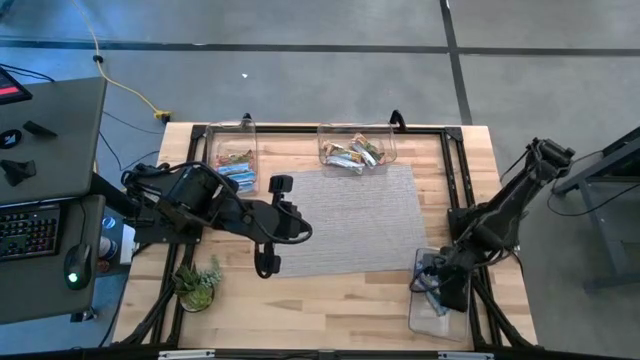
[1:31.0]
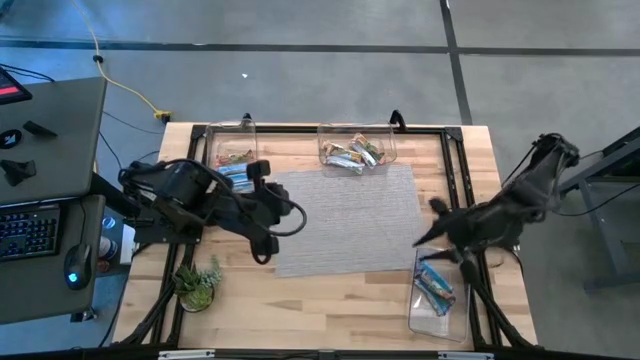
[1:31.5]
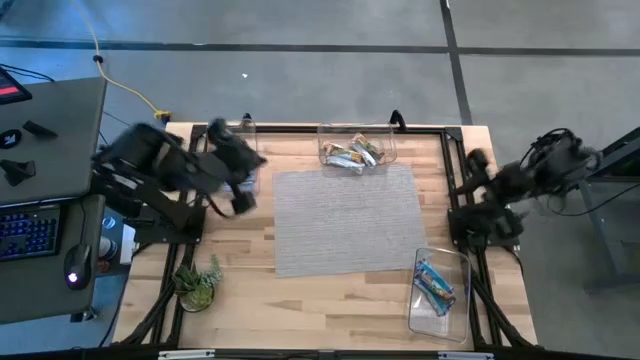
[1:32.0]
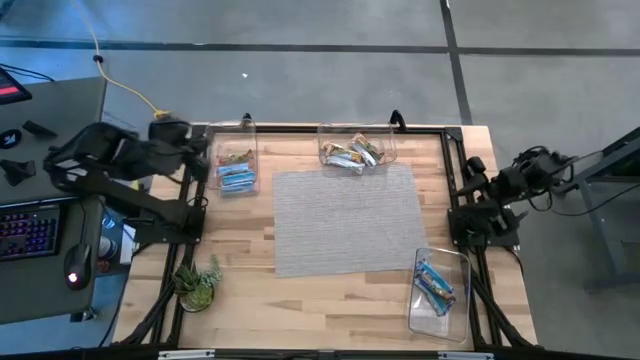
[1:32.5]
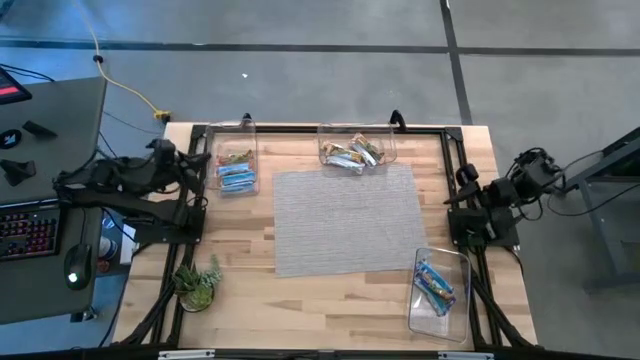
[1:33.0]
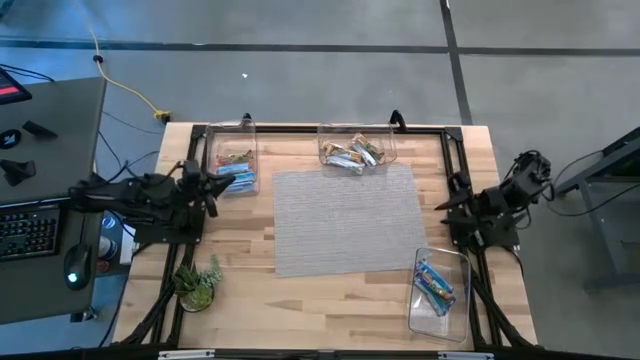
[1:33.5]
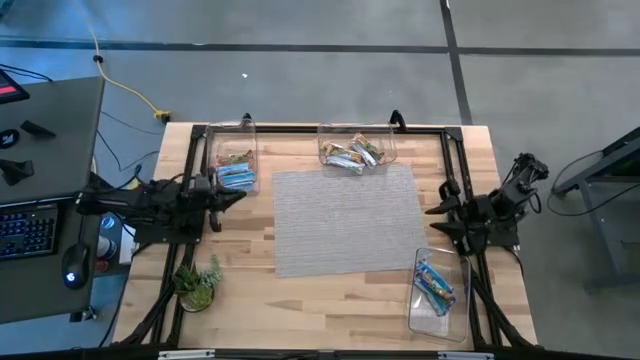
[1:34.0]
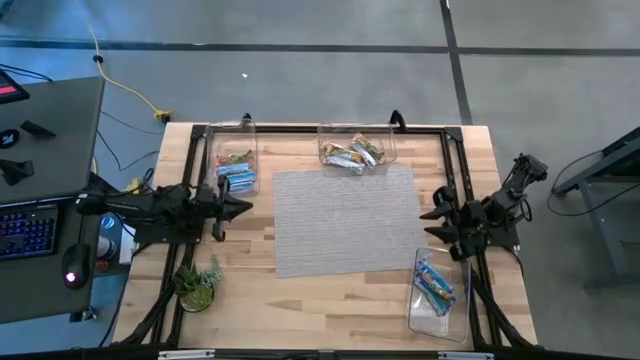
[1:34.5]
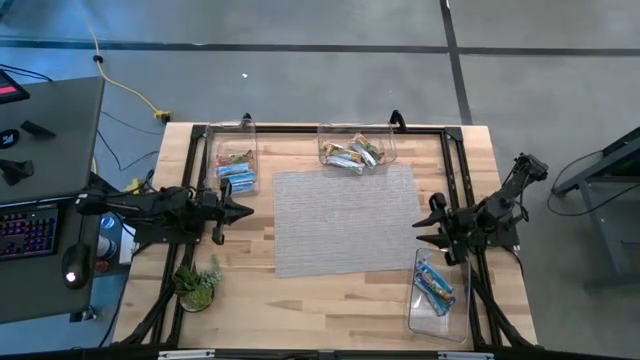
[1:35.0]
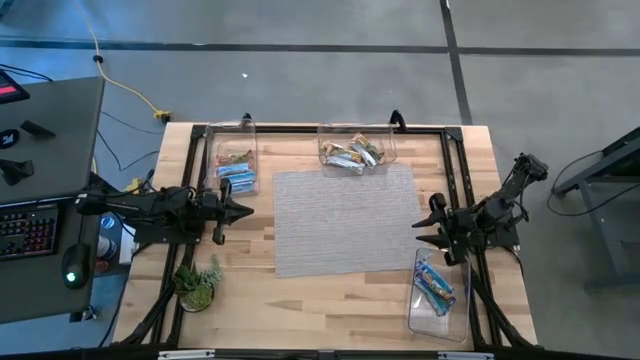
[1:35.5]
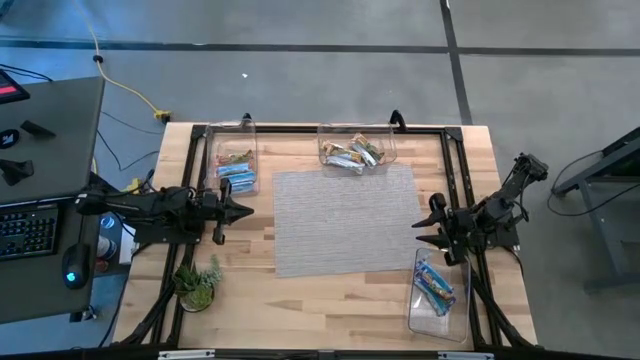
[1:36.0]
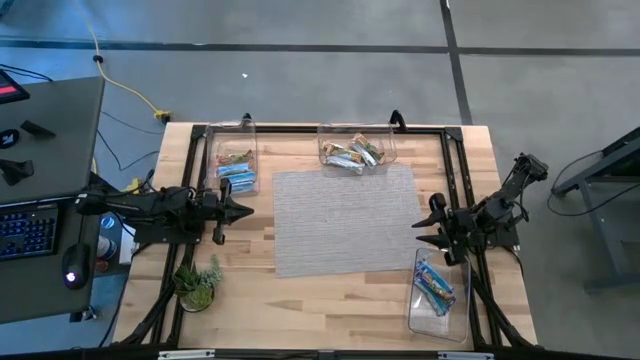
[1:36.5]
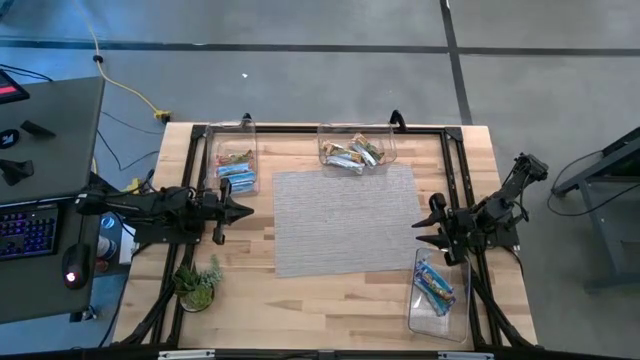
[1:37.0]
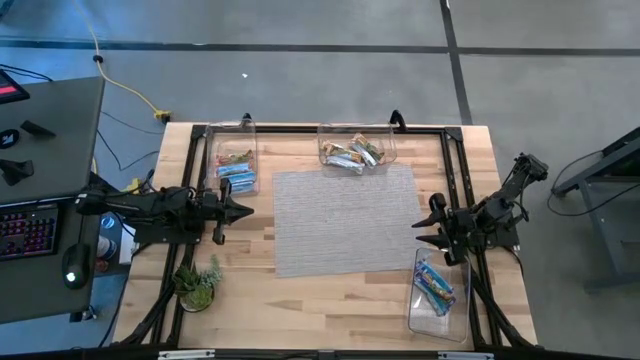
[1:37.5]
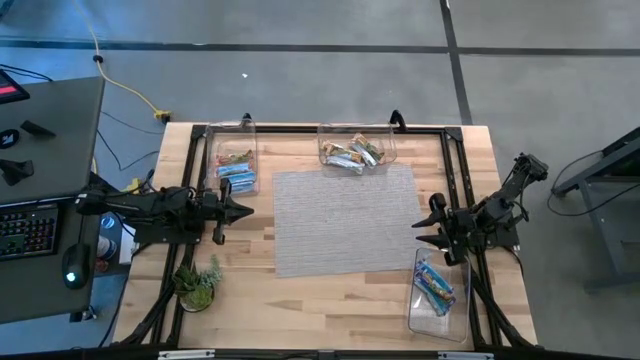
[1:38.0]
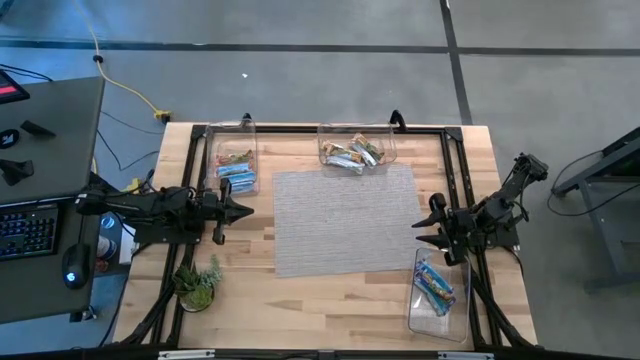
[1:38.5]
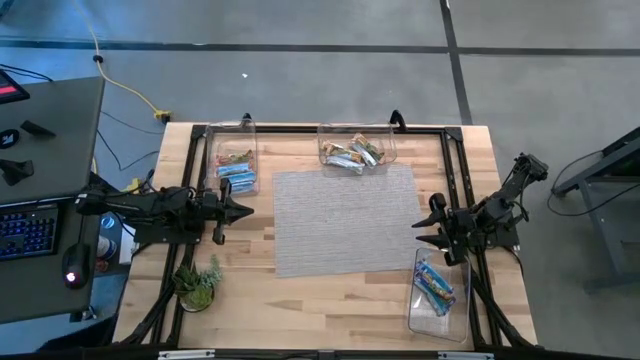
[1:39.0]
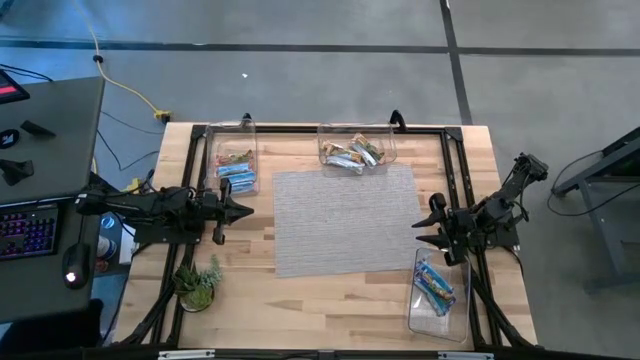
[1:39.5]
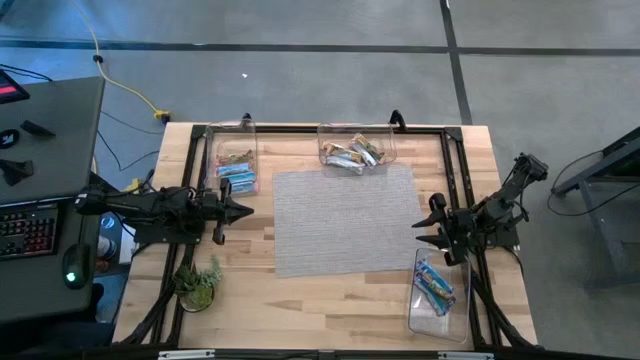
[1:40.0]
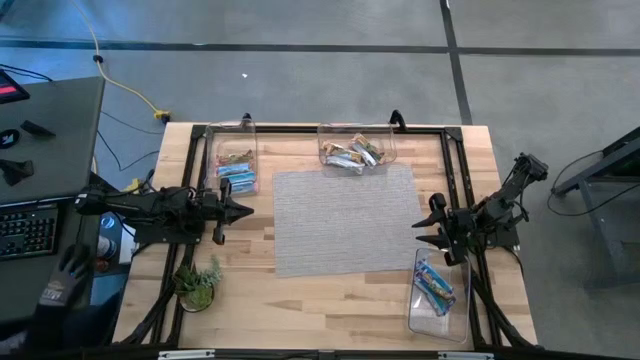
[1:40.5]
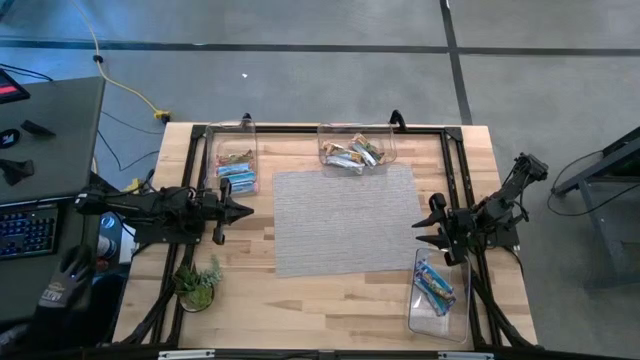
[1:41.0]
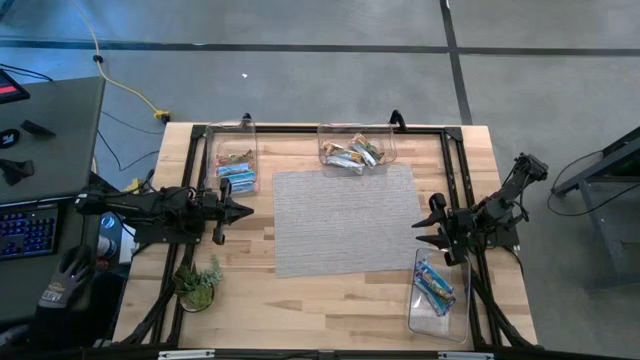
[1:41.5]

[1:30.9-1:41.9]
Task: Pick and place Granola Bars by type
Return to Home Position

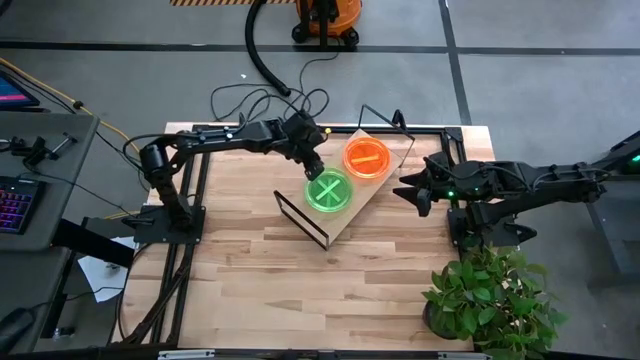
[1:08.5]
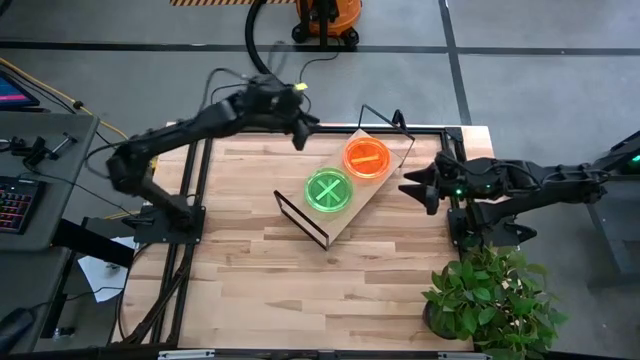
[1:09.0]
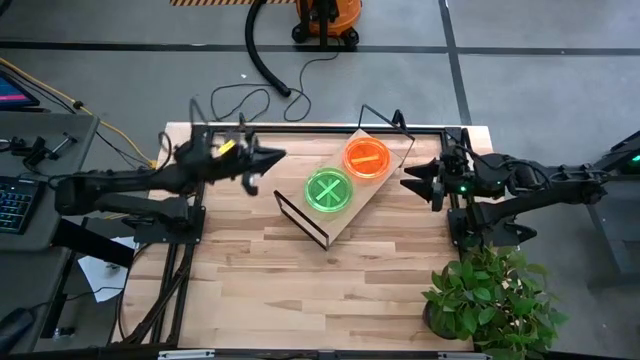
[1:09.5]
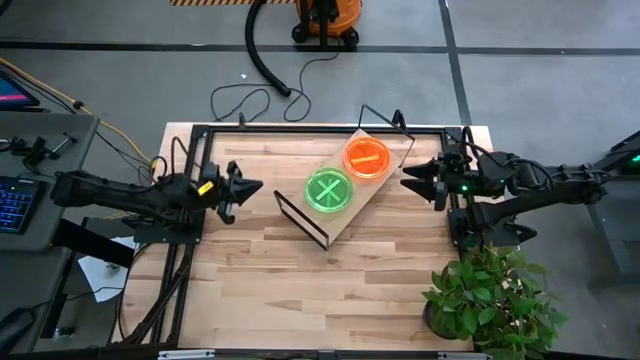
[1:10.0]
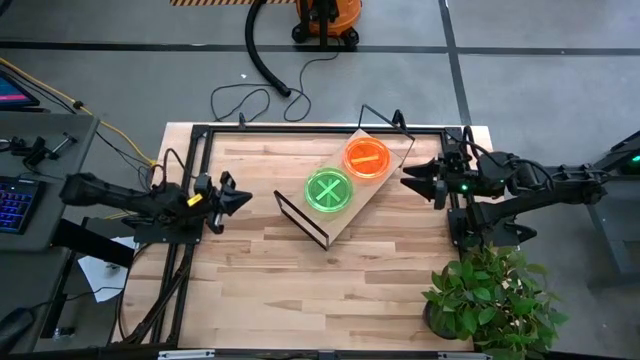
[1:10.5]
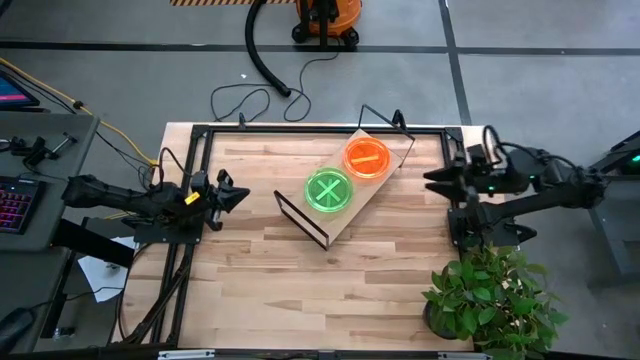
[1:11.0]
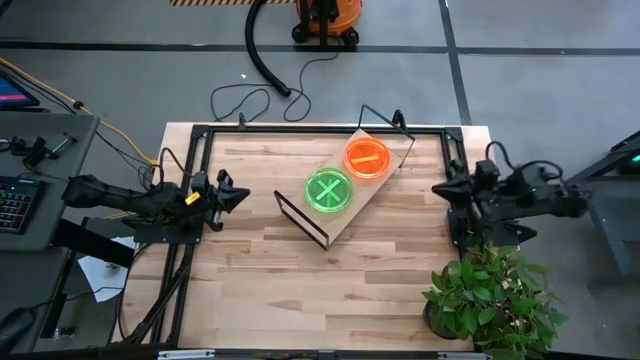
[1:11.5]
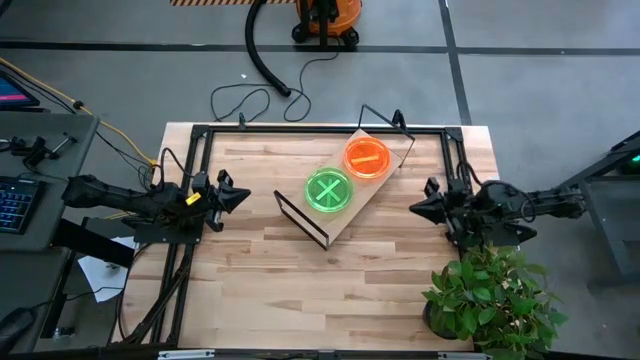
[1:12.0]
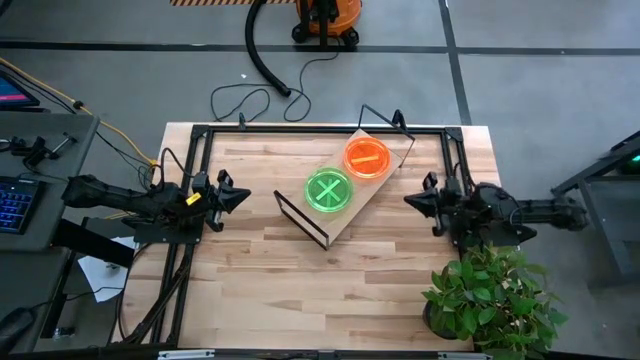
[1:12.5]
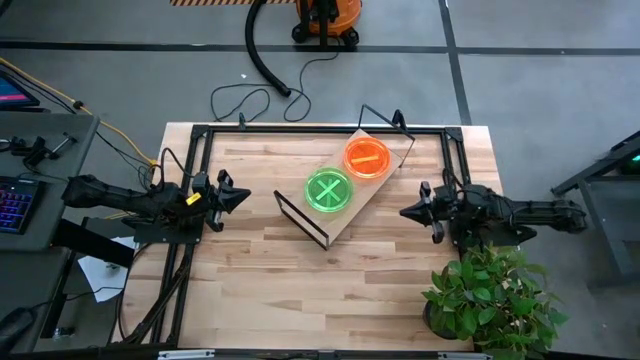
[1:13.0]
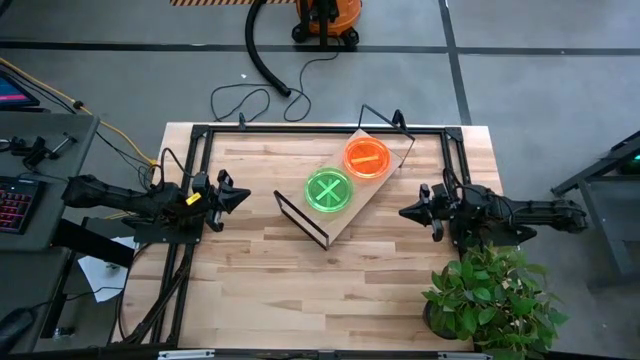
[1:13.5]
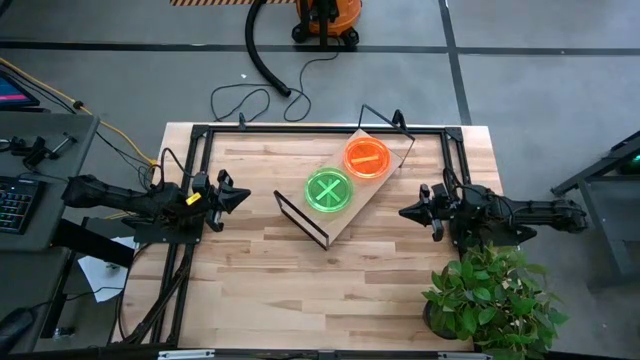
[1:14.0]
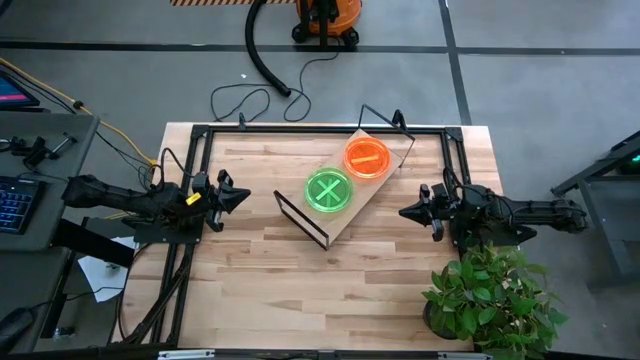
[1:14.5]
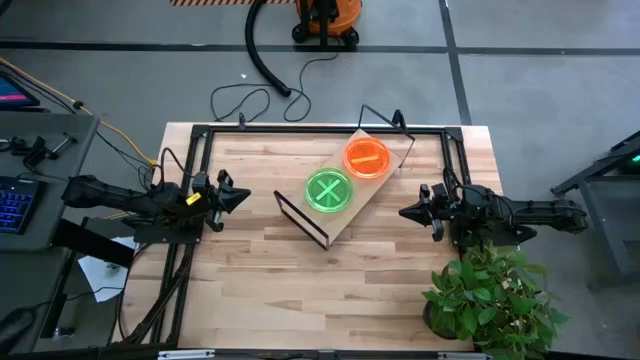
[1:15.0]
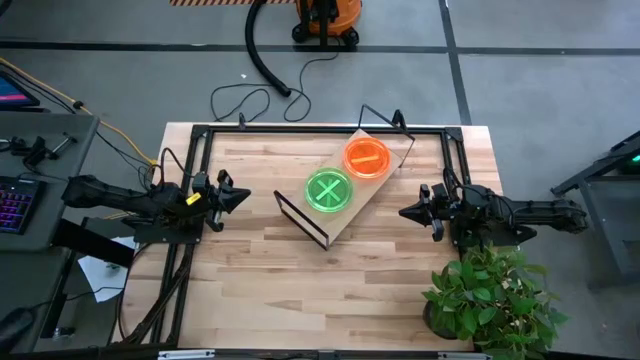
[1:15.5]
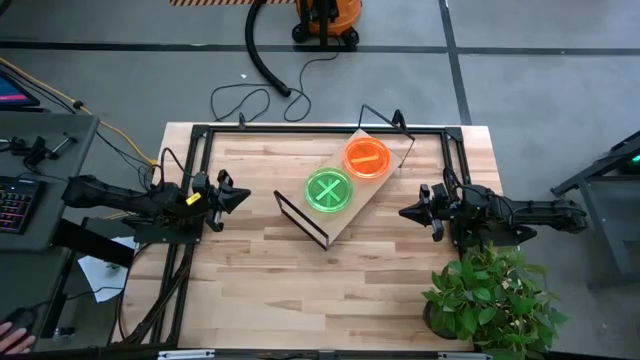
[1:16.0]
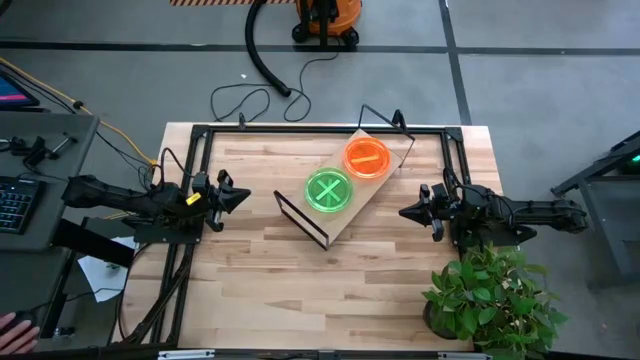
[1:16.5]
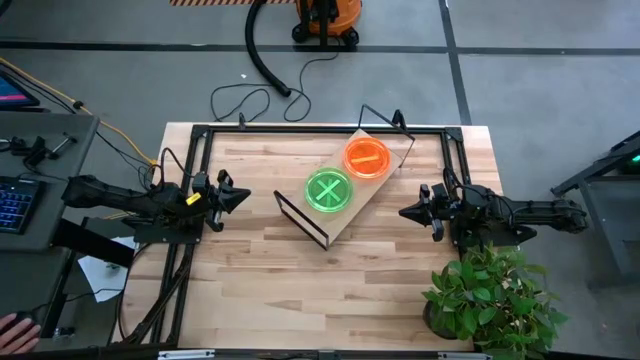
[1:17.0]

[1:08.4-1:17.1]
Task: Place and stack plates onto a shelf
Return to Home Position
